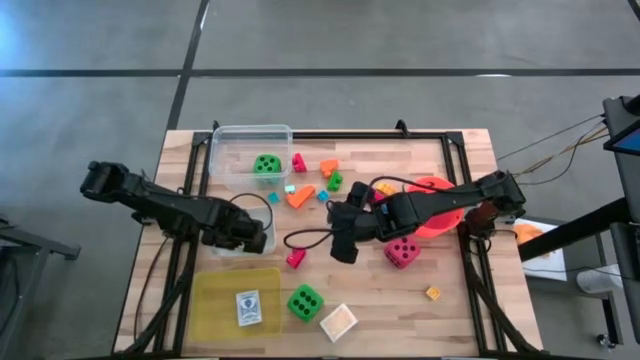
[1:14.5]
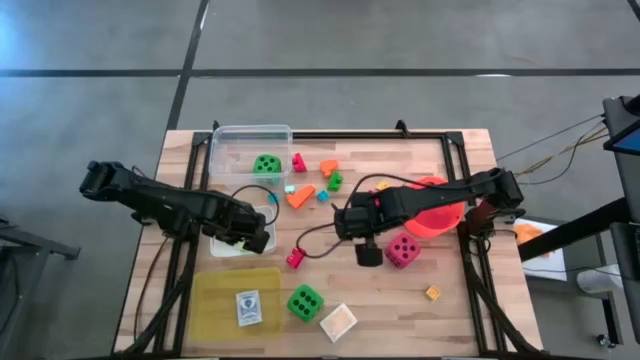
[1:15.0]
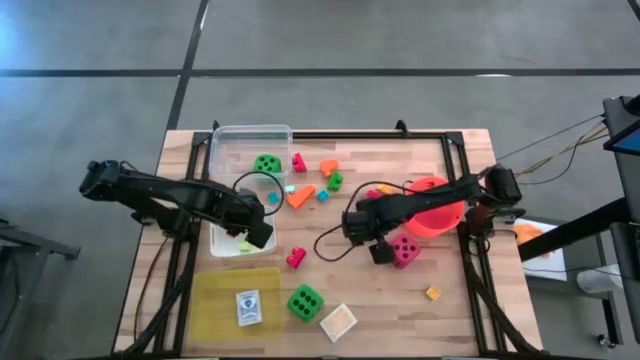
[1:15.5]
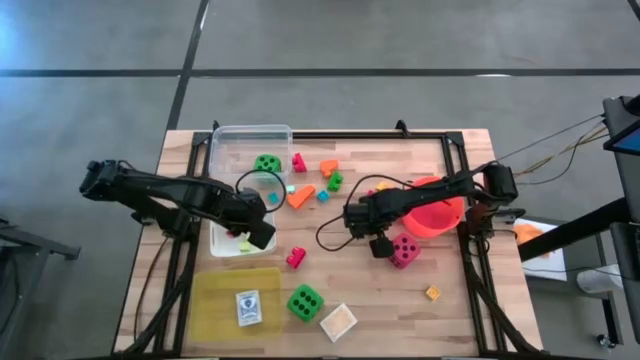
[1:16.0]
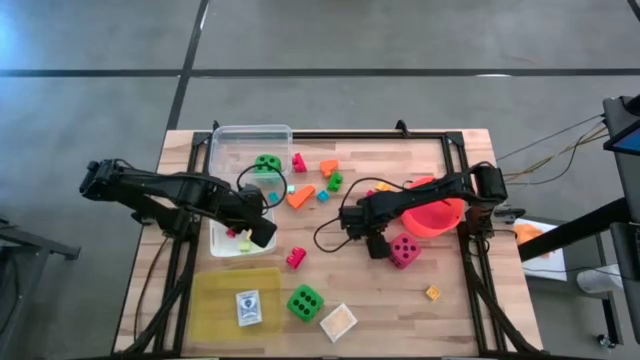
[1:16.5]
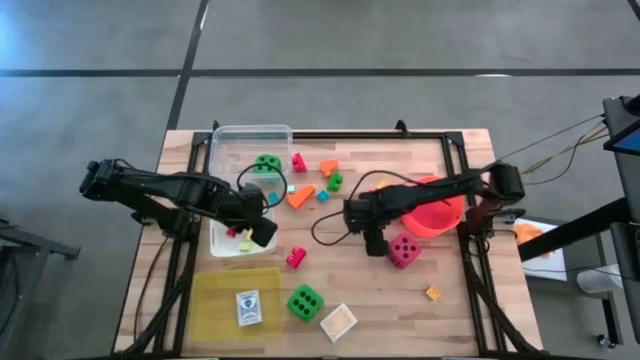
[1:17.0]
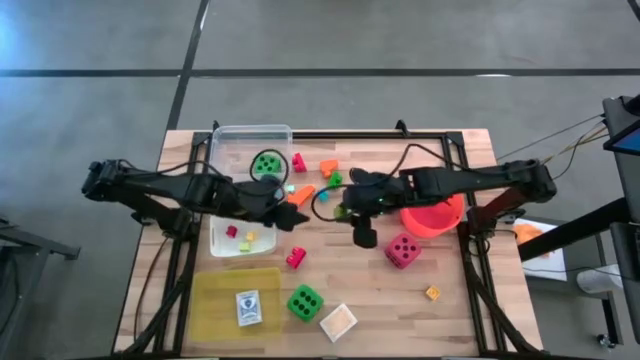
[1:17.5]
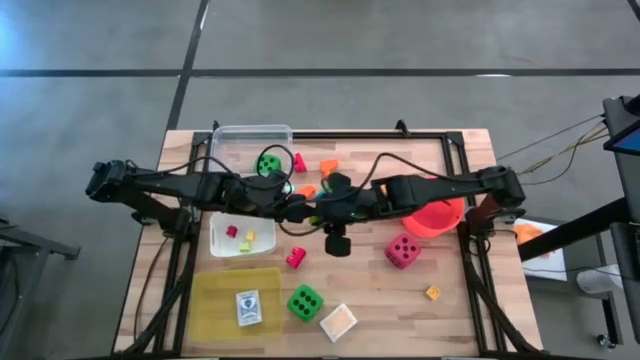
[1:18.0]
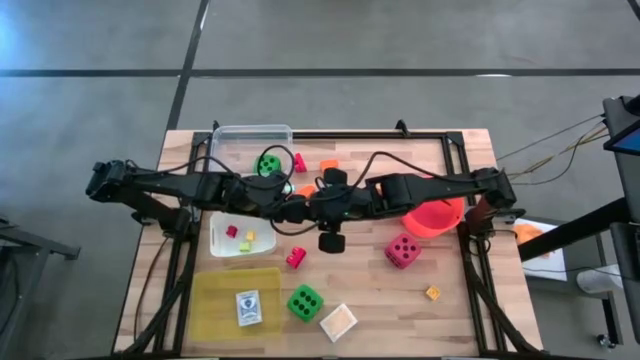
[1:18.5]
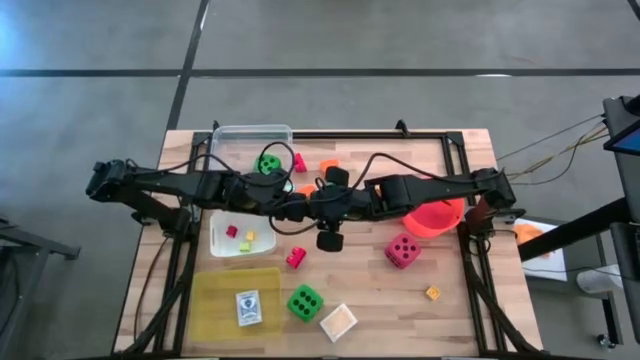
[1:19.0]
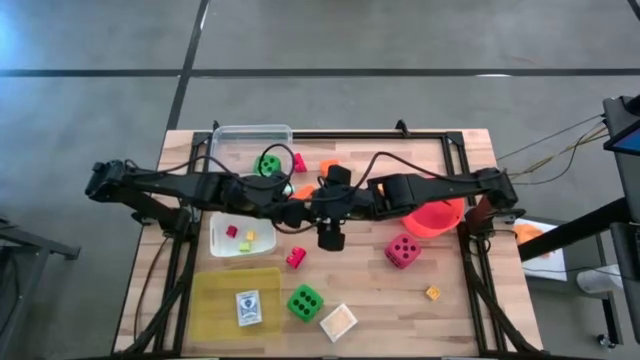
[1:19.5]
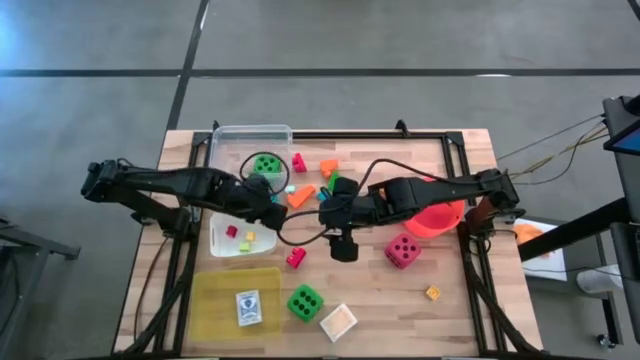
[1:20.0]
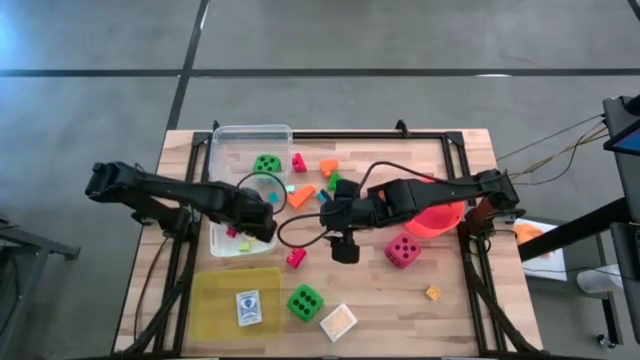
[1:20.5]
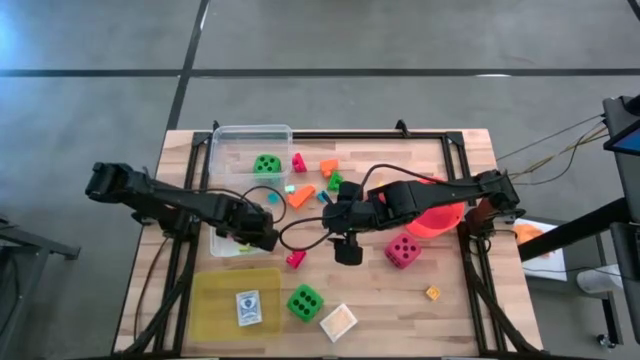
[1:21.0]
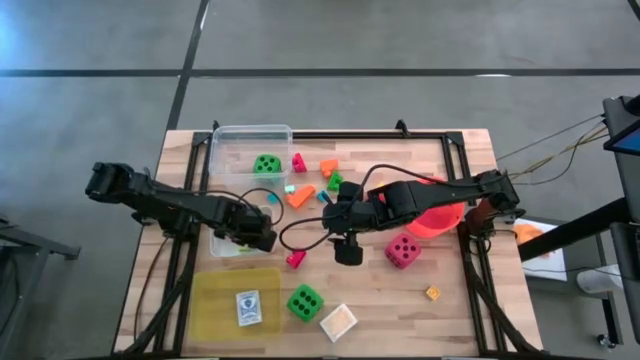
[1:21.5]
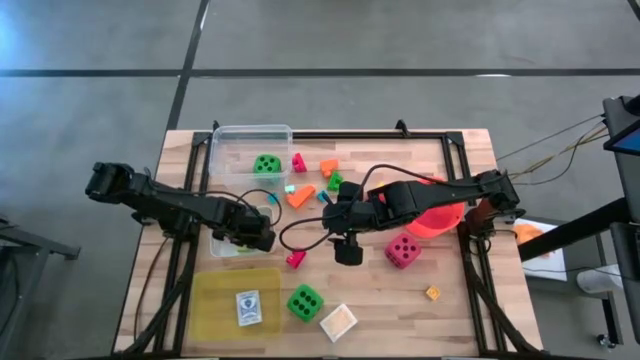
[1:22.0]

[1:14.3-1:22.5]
Task: Pick & Place Toys
Put the green game piece into the white bin

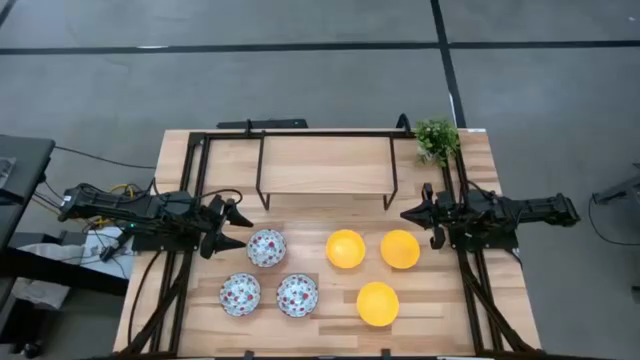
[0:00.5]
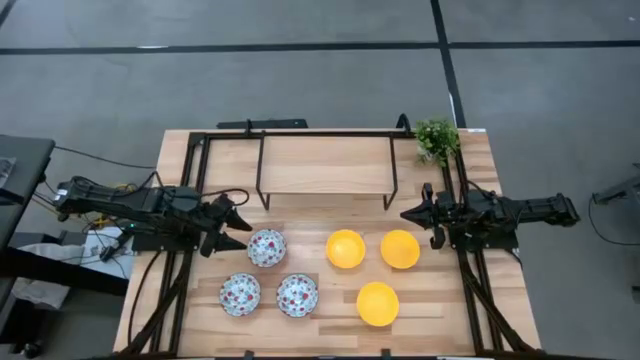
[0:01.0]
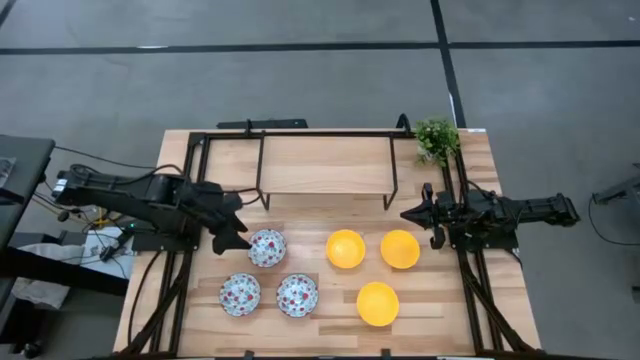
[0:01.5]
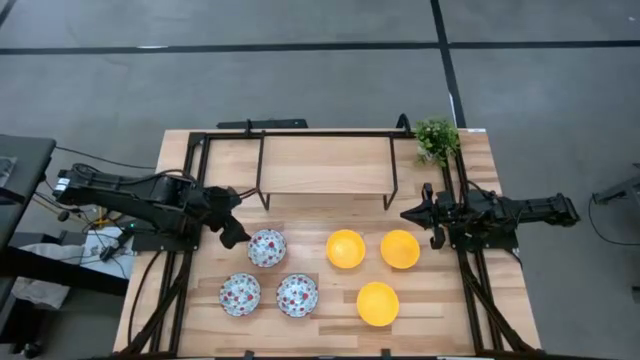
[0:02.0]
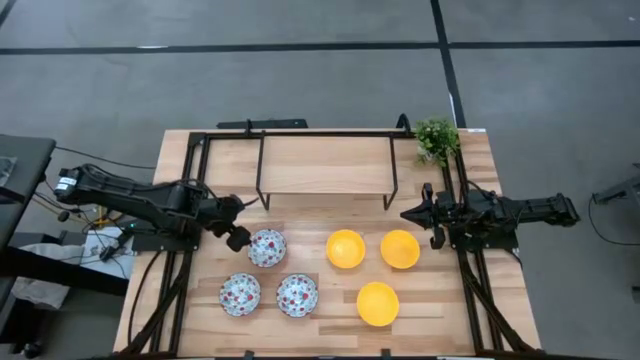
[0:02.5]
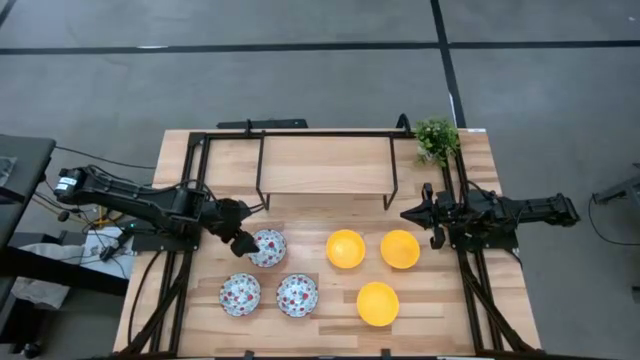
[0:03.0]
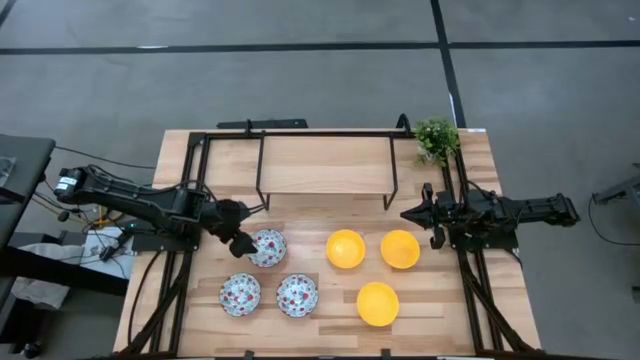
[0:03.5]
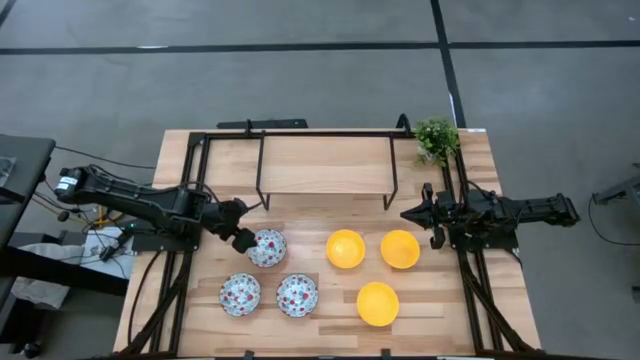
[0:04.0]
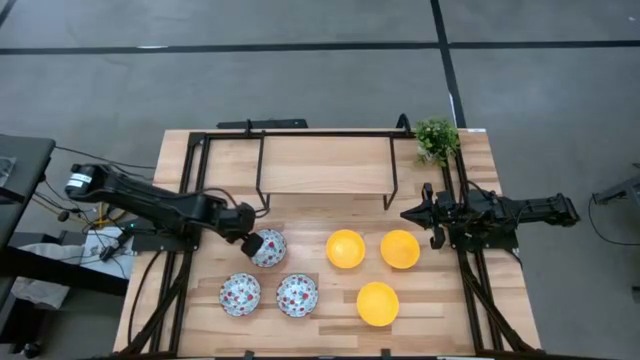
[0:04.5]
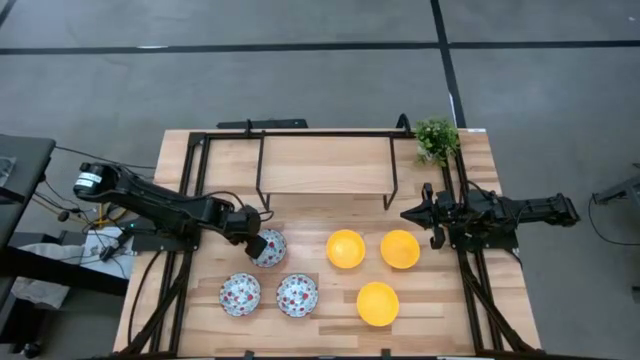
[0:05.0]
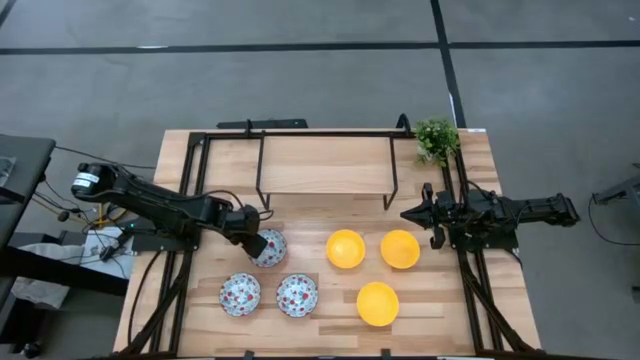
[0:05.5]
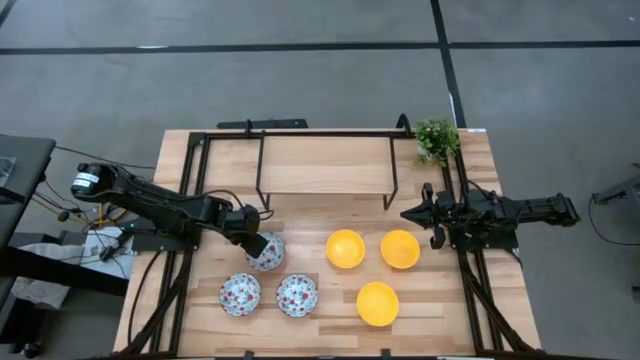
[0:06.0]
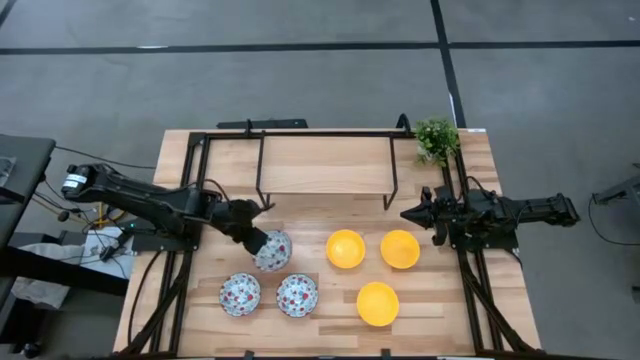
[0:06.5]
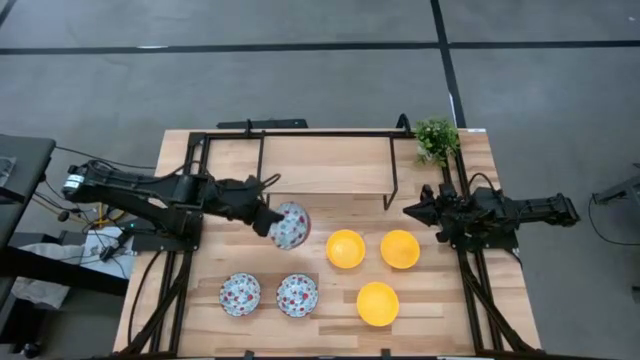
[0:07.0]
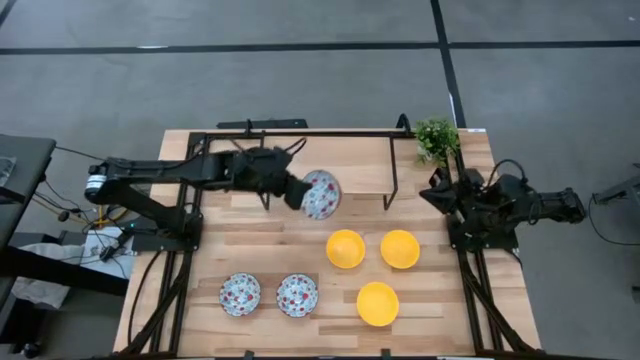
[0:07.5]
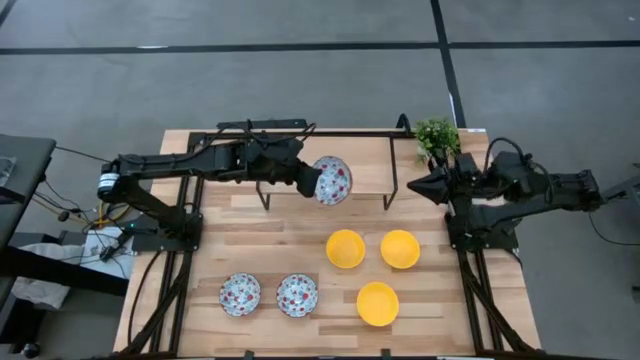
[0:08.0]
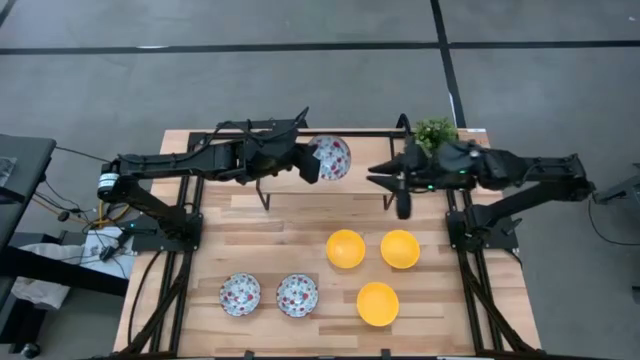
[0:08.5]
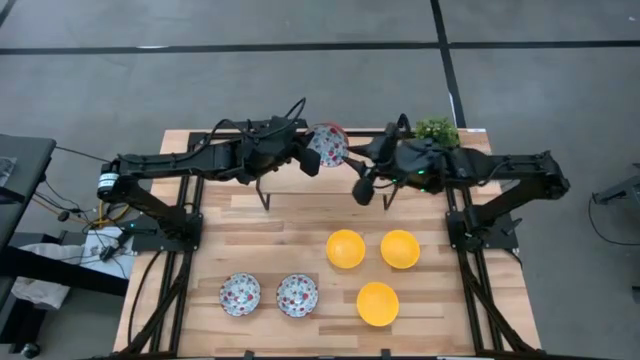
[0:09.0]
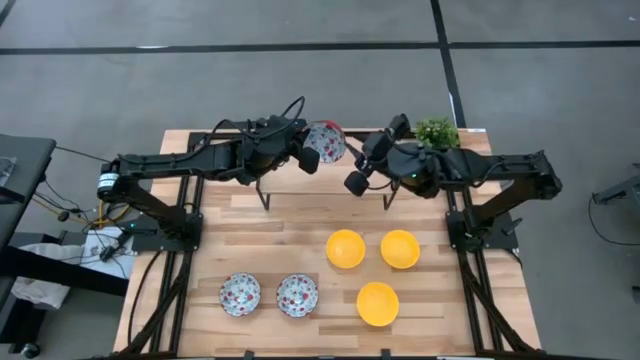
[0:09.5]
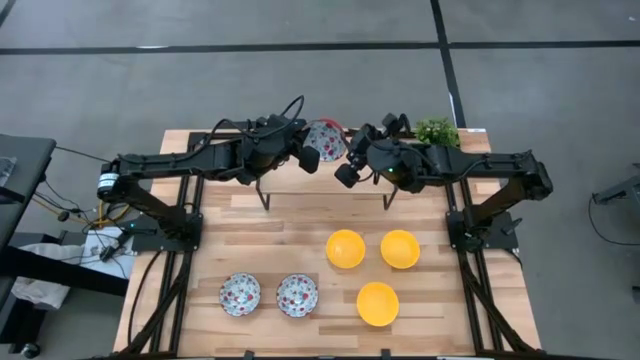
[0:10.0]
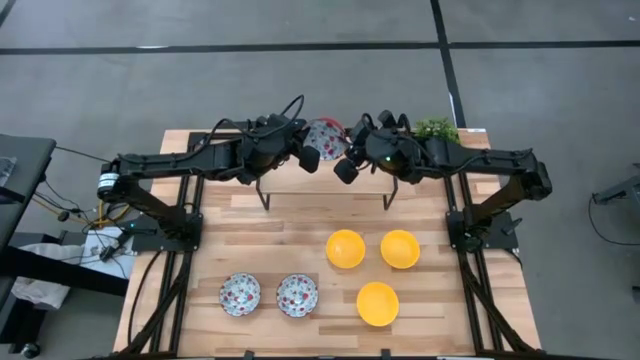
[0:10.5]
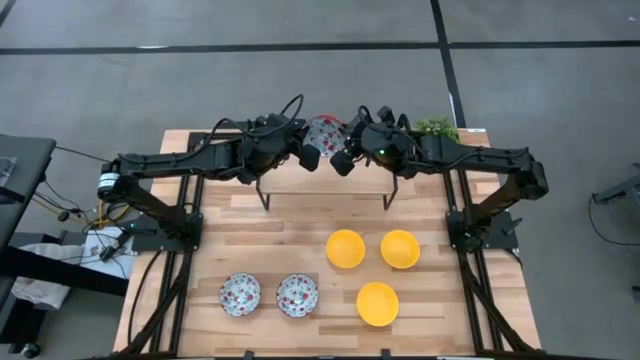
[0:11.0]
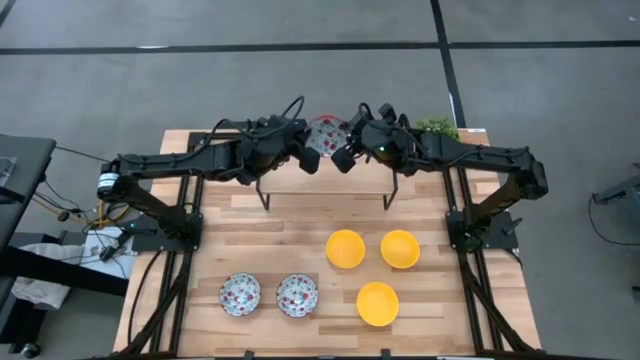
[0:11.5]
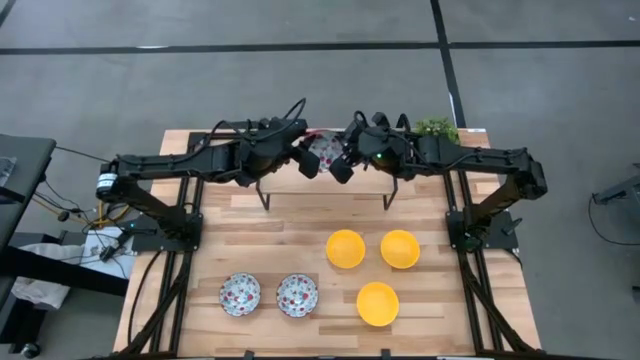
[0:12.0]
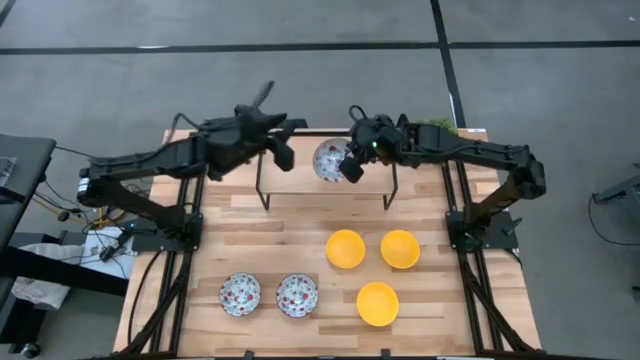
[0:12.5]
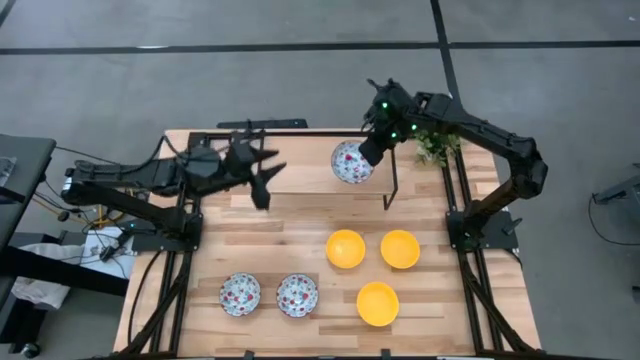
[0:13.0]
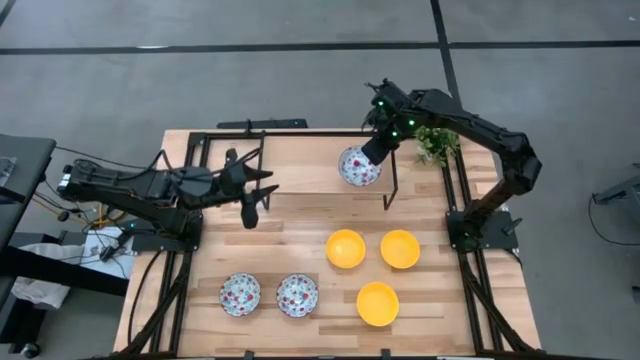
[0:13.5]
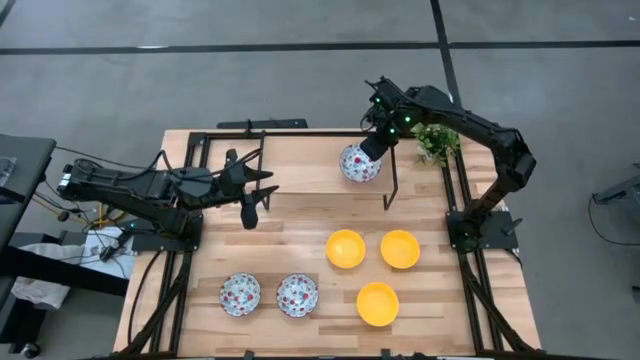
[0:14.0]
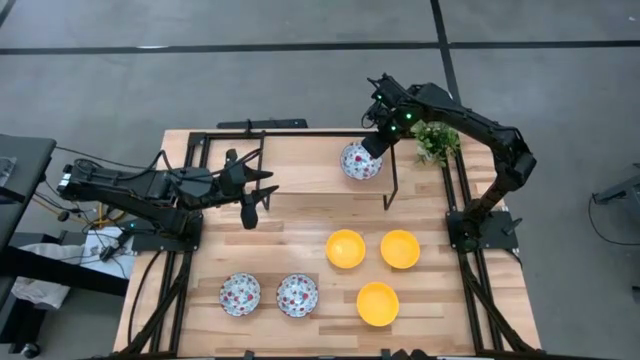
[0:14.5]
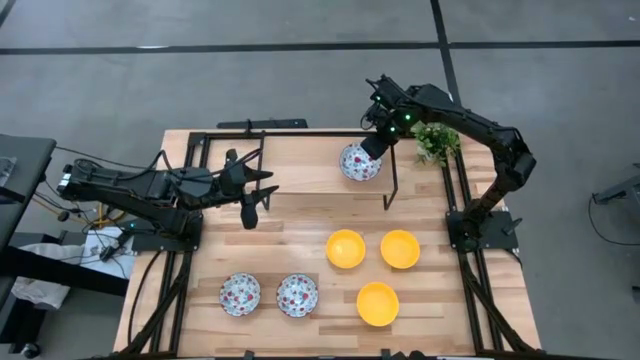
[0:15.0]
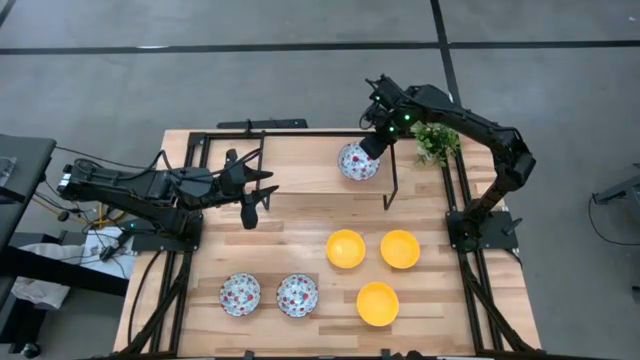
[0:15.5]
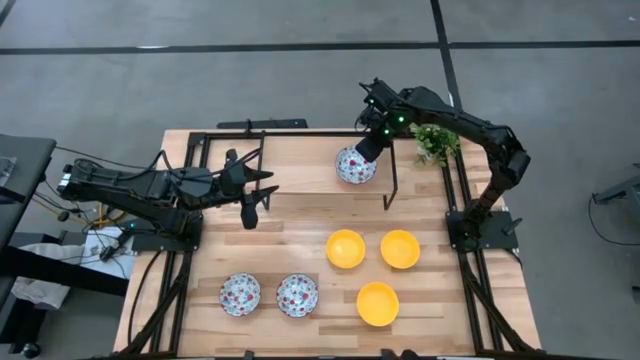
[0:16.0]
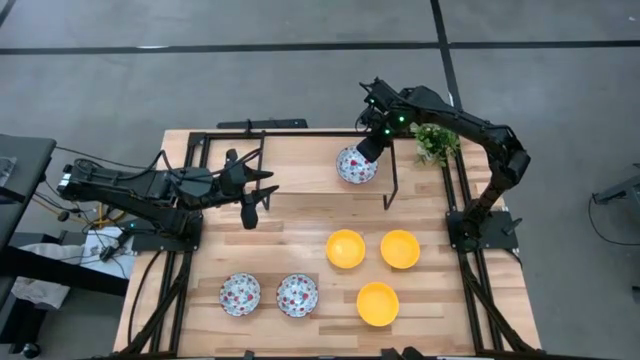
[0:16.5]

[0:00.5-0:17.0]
Task: Pick & Place Mini bowls
Put the top red patterned bowl on the shelf
